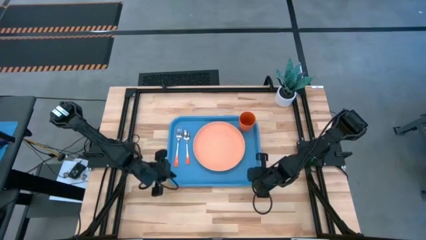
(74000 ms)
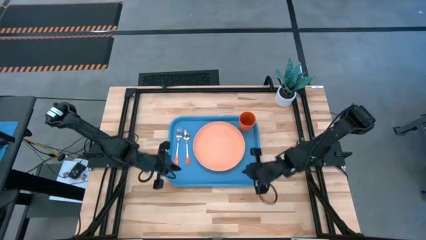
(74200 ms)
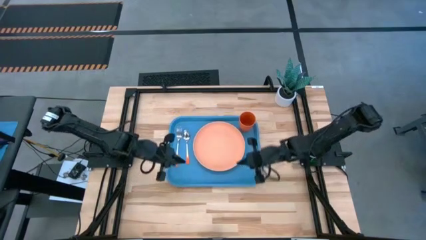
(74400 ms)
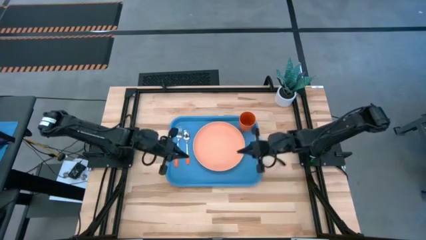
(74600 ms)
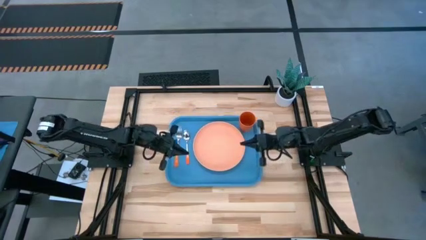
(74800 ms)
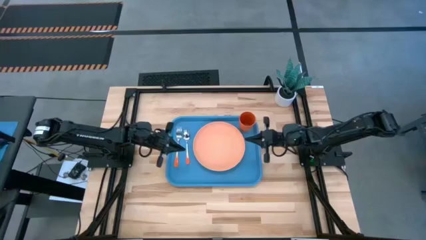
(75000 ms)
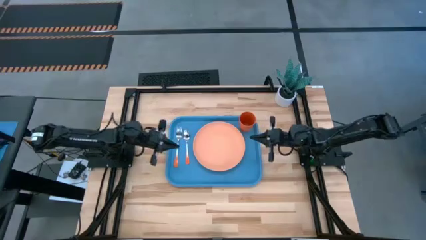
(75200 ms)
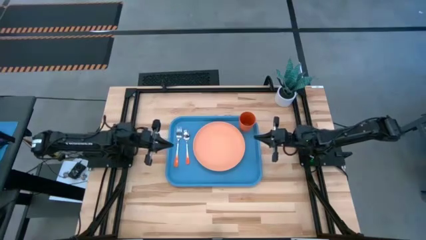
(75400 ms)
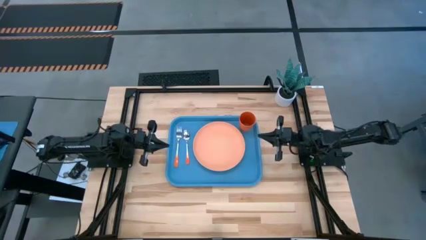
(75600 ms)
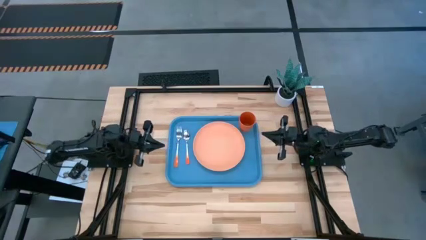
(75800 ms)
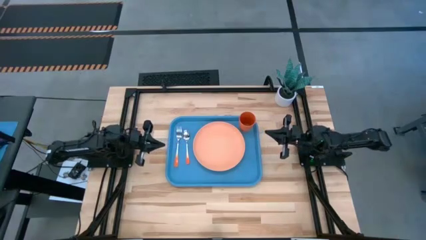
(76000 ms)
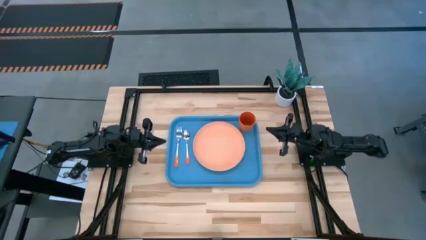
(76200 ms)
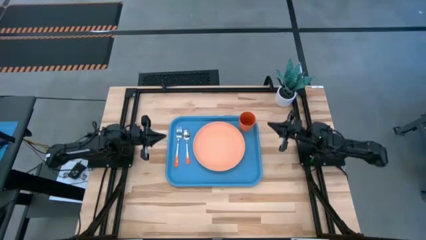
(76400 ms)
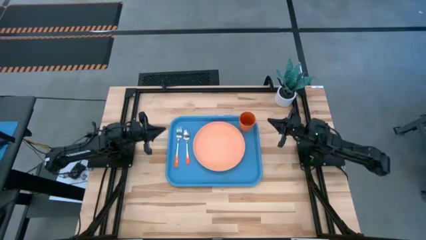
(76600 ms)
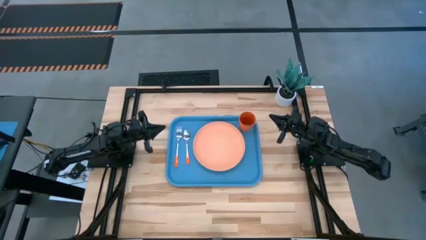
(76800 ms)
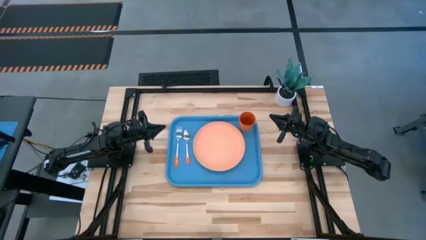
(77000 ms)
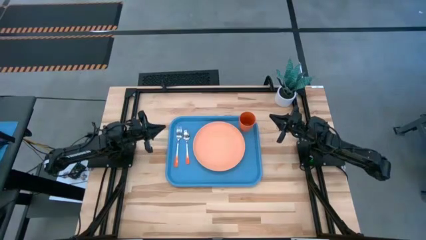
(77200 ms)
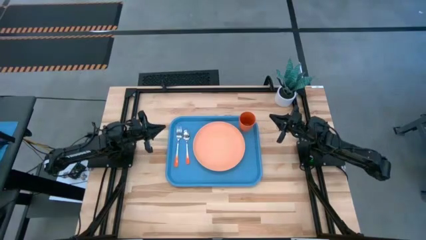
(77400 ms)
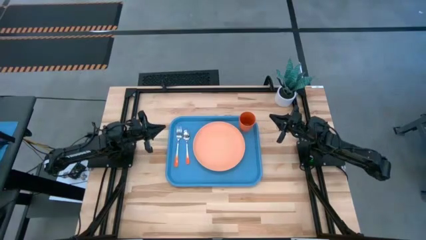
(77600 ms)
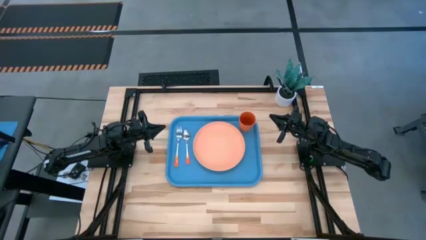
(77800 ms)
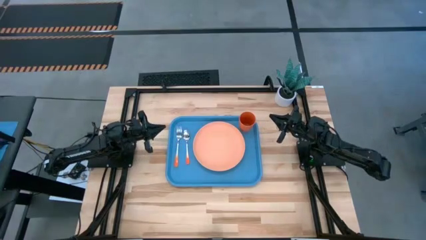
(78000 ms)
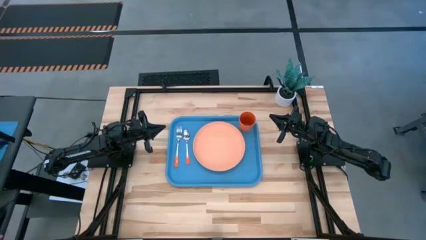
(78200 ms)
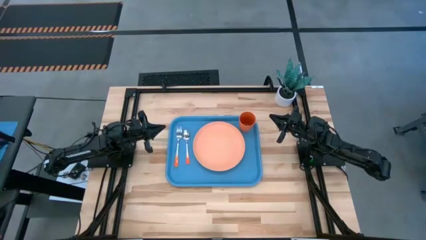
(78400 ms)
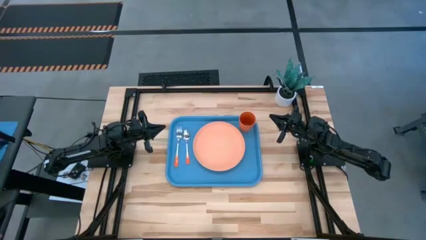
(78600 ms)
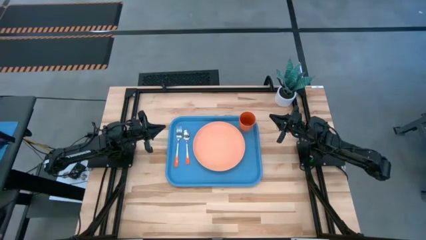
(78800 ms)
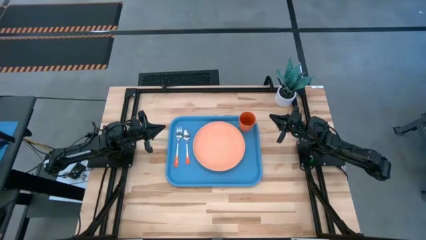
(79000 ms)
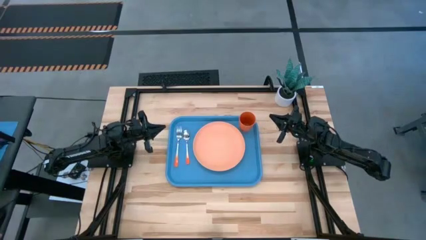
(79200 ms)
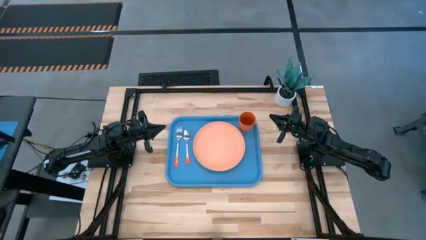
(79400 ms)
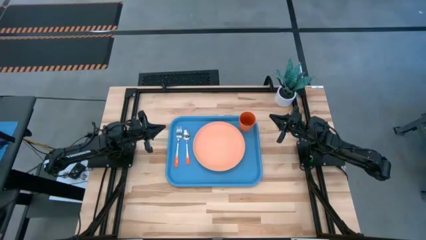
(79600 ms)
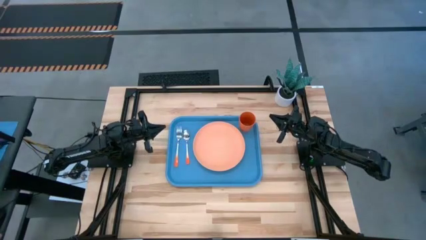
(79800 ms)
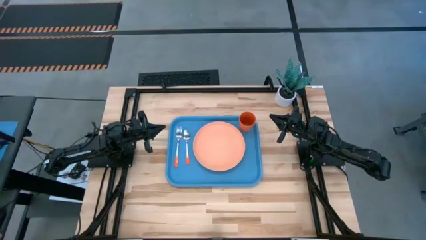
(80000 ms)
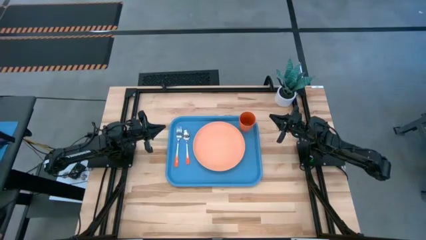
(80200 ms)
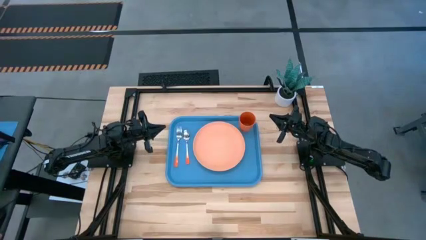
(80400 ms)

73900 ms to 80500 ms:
Task: Pick and place plate/cup/fork/spoon on tray
Return to Home Position

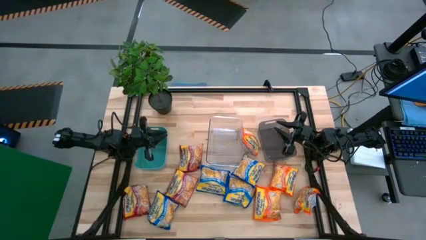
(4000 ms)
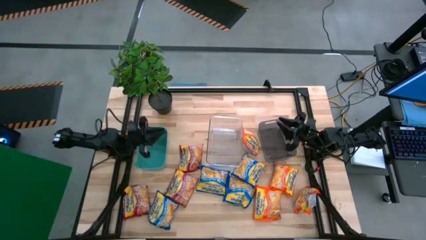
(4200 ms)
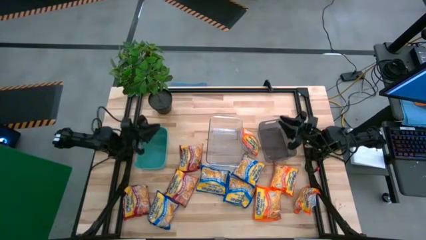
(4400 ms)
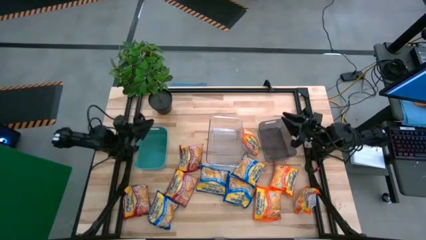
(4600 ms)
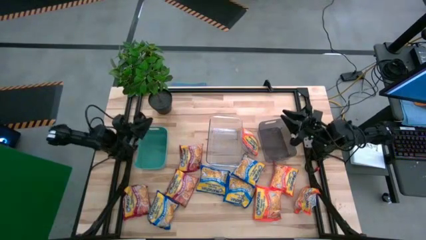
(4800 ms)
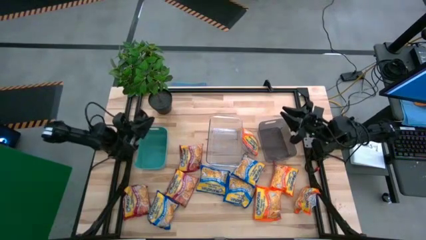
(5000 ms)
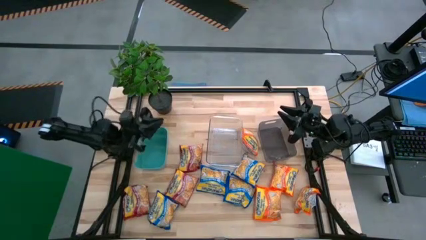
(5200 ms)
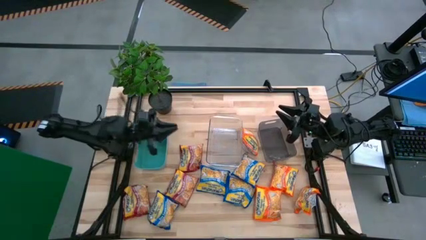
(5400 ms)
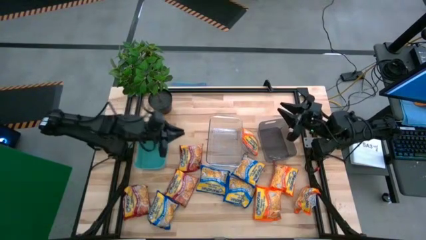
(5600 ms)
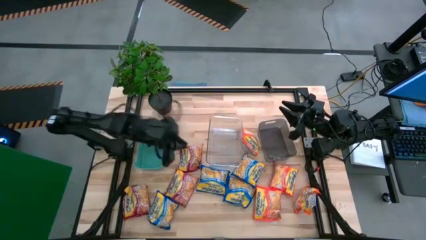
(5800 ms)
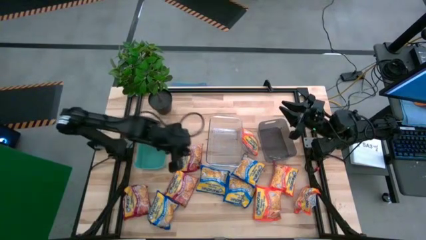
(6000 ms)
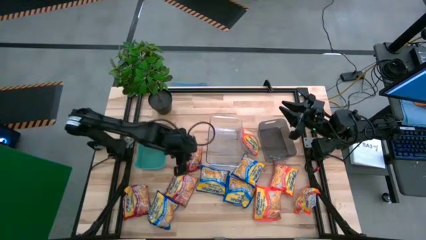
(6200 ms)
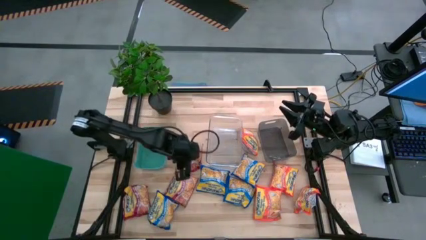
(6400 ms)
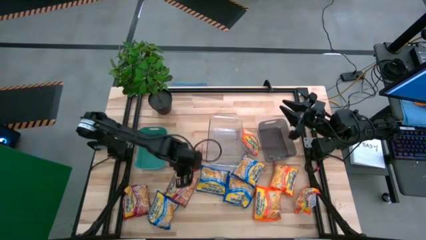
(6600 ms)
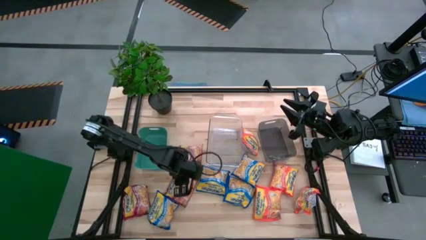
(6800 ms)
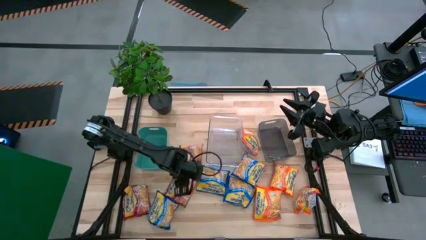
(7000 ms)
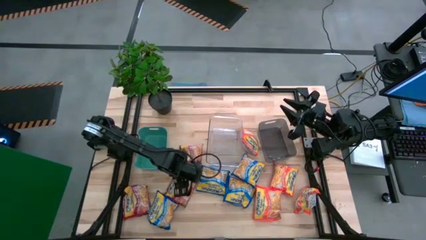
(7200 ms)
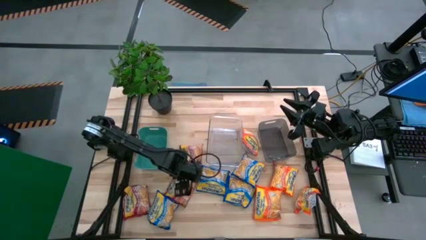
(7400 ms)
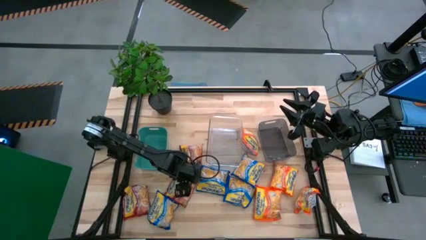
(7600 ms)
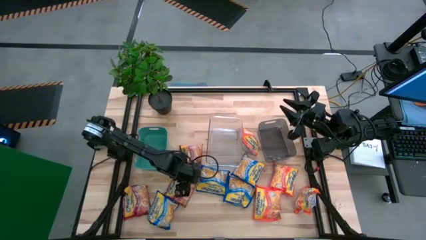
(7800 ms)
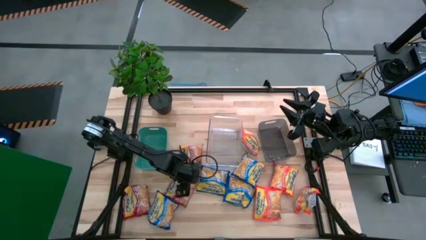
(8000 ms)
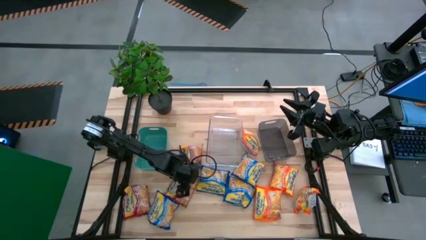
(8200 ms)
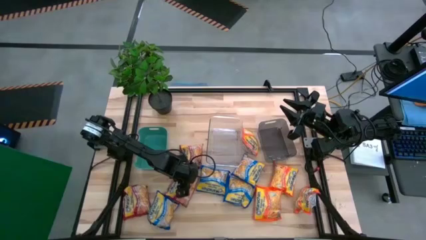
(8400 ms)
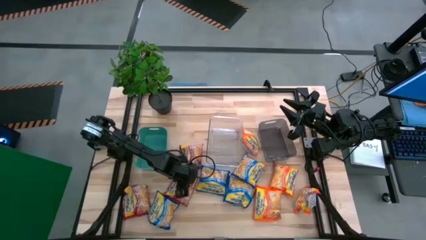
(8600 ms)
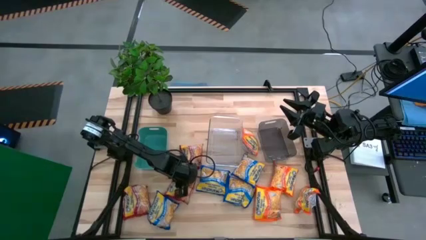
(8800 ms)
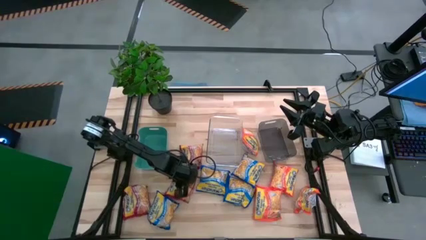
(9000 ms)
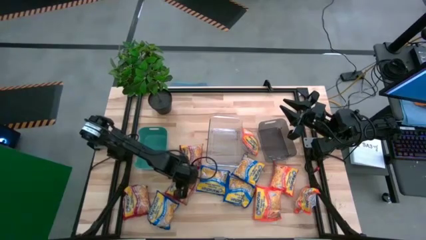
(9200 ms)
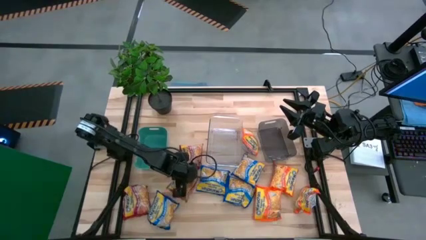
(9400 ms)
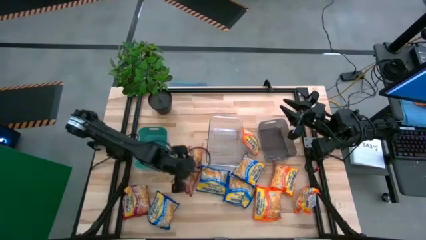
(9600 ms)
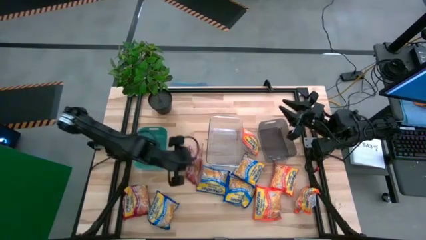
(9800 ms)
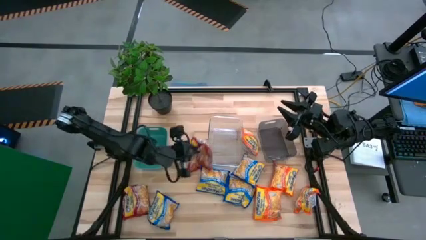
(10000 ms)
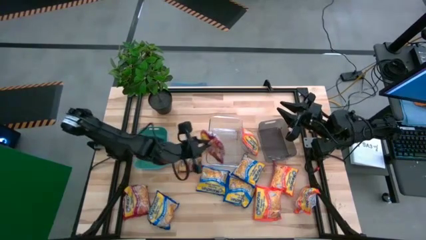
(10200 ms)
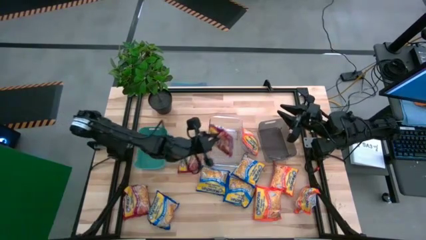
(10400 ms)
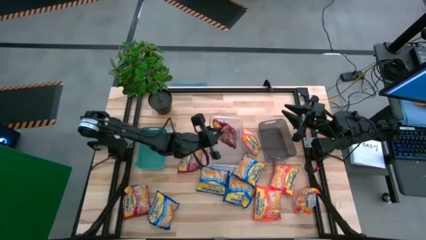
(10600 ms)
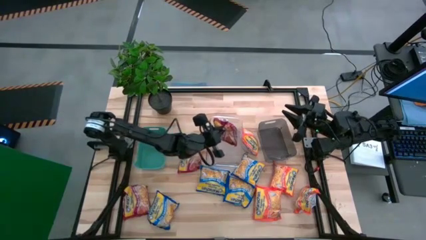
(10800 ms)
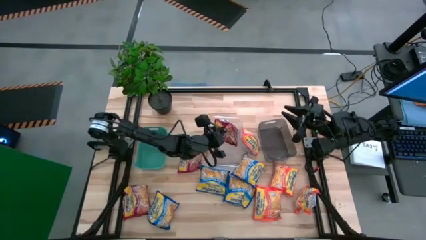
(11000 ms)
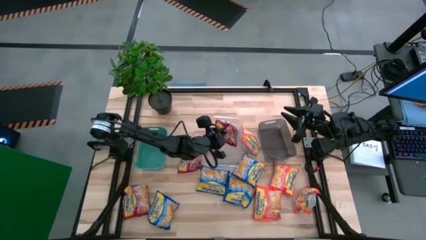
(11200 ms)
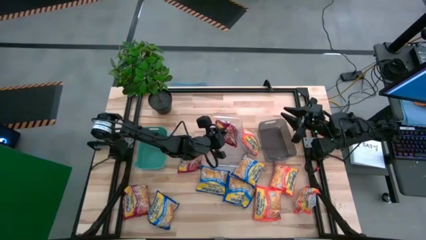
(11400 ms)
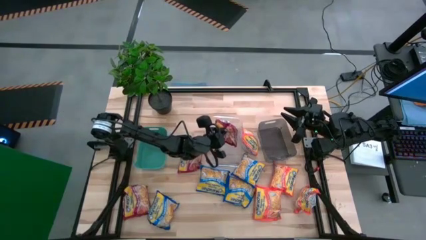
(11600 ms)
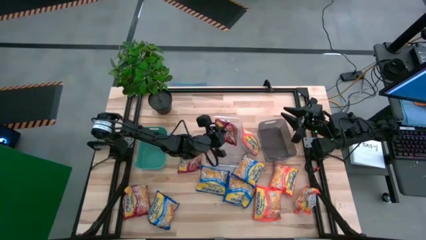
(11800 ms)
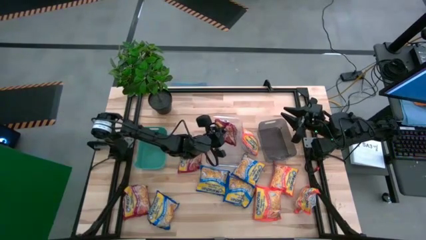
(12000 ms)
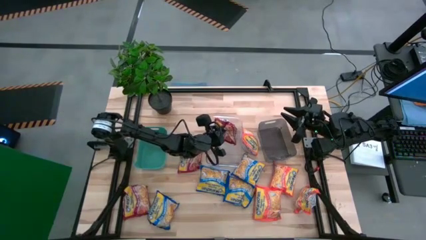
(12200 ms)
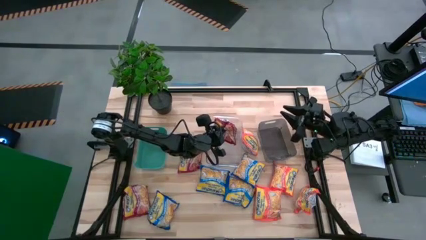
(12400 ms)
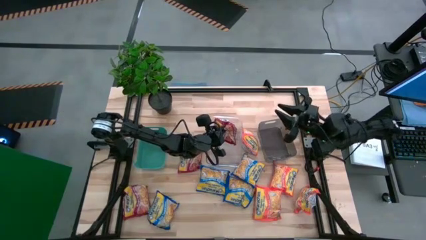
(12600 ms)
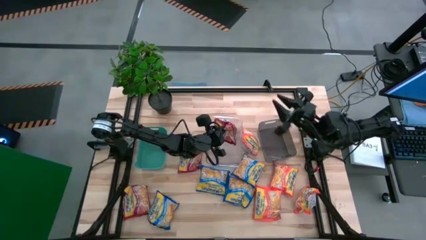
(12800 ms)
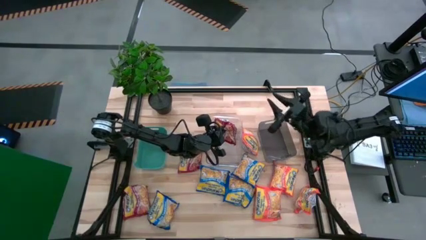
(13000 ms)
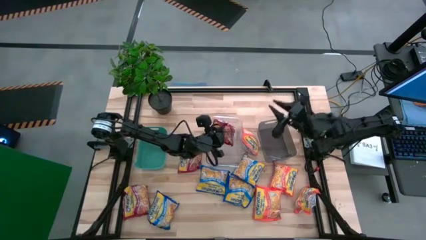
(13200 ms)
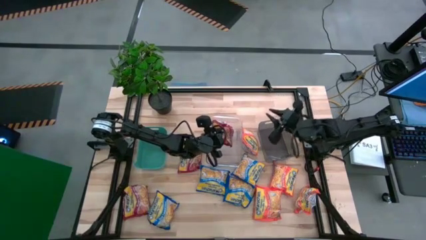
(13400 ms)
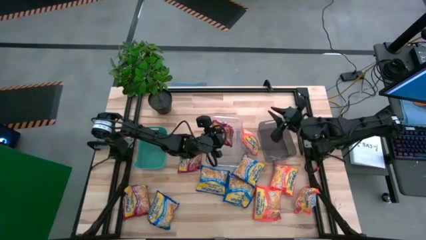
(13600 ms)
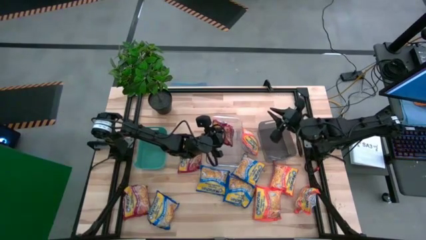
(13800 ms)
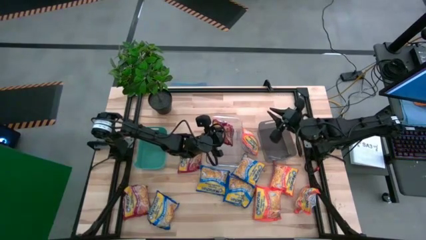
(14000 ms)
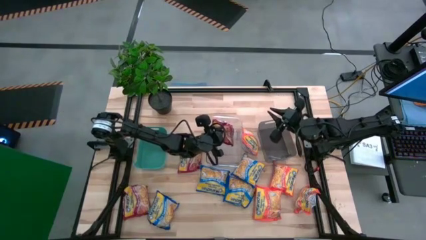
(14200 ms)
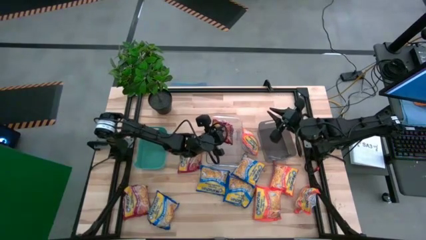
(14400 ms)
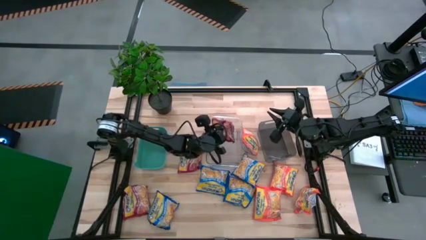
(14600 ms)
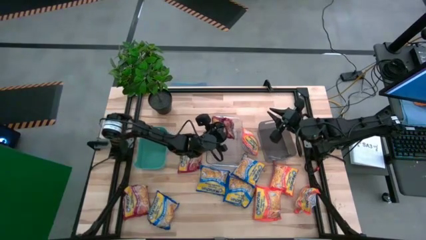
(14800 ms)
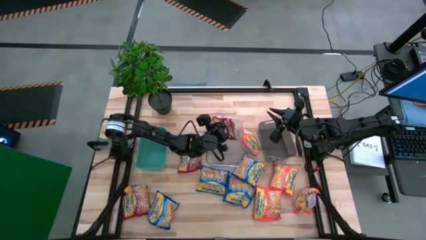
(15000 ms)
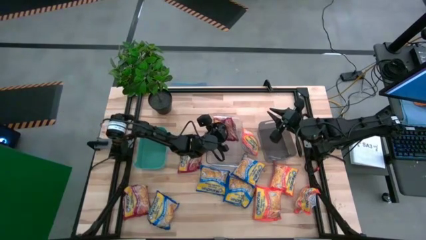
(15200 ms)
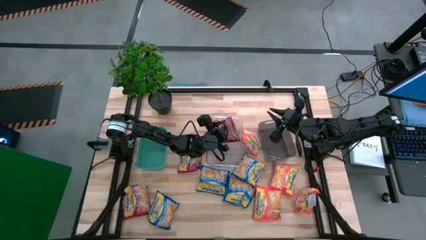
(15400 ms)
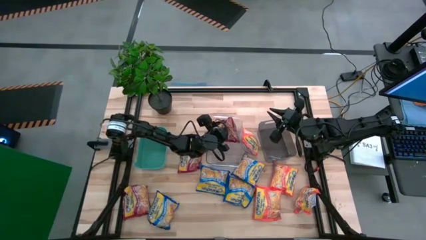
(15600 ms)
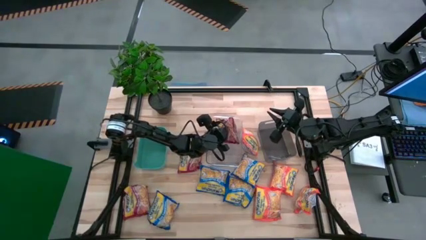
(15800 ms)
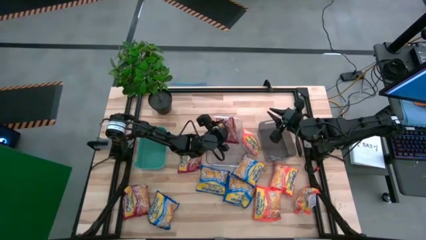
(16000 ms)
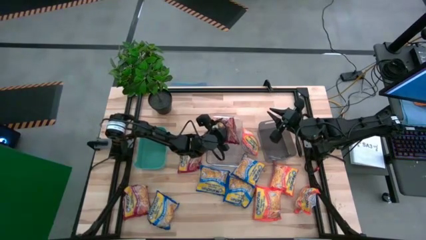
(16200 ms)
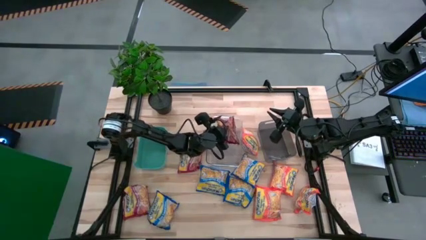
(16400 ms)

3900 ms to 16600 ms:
Task: Sort Maruchan noodles
Put the red noodle pack into the transparent bin
